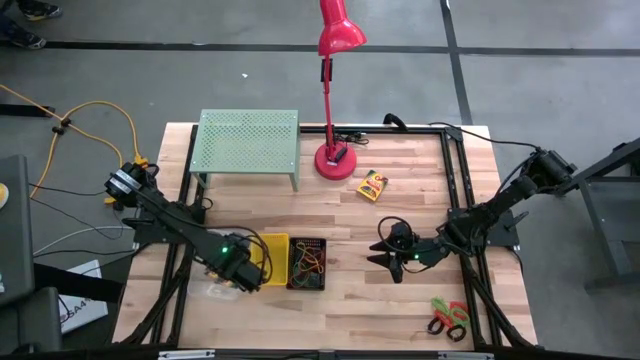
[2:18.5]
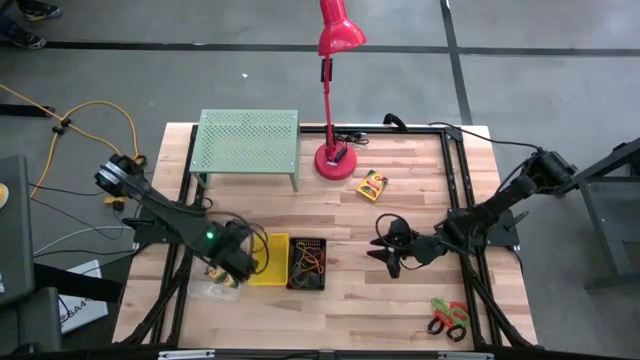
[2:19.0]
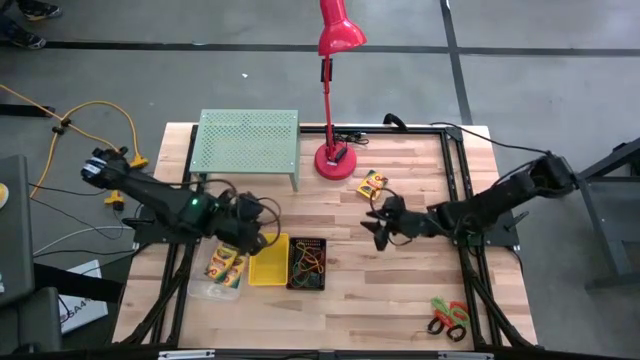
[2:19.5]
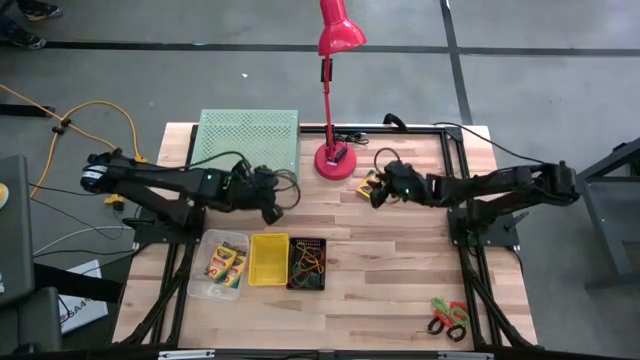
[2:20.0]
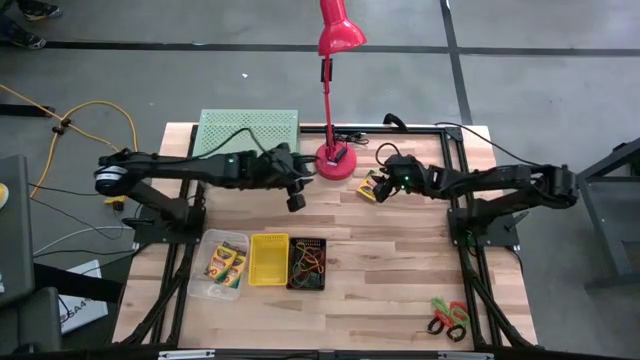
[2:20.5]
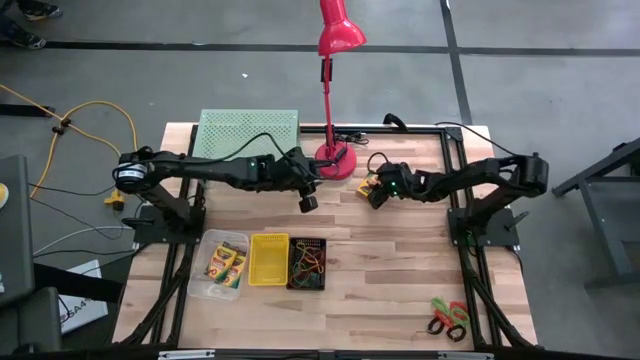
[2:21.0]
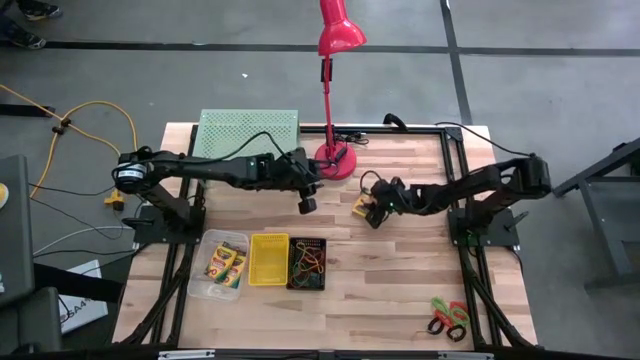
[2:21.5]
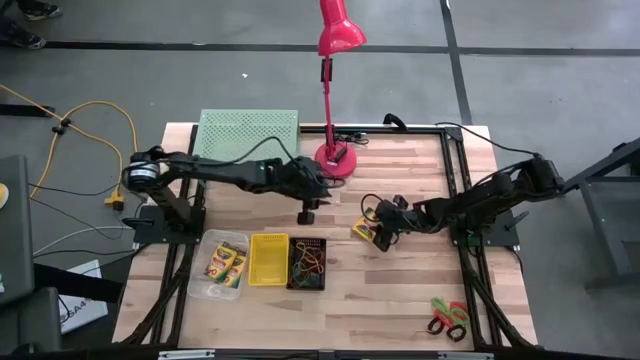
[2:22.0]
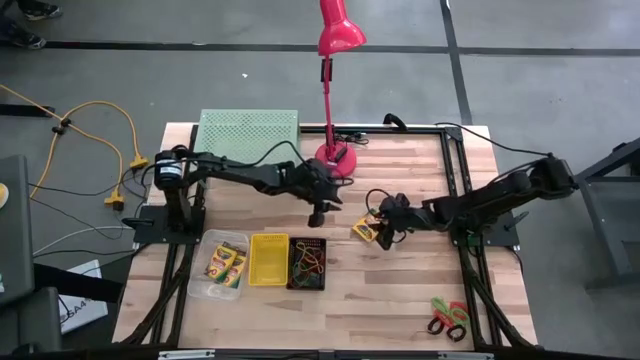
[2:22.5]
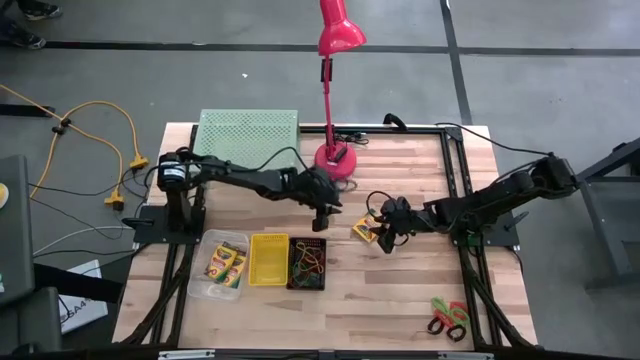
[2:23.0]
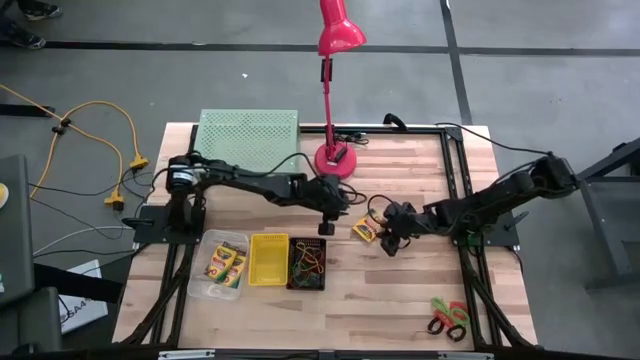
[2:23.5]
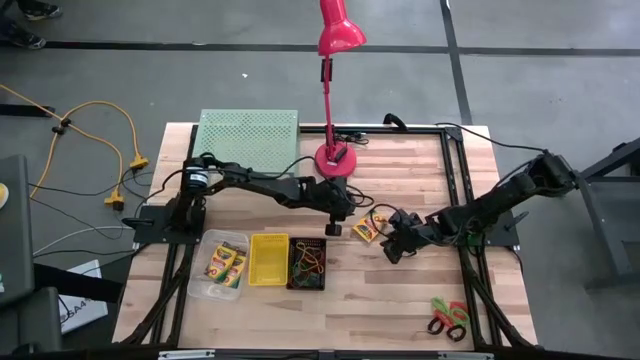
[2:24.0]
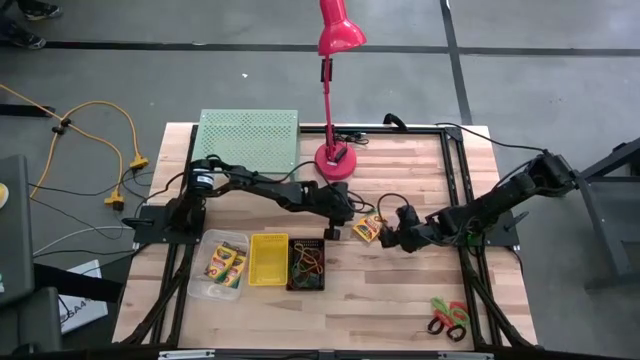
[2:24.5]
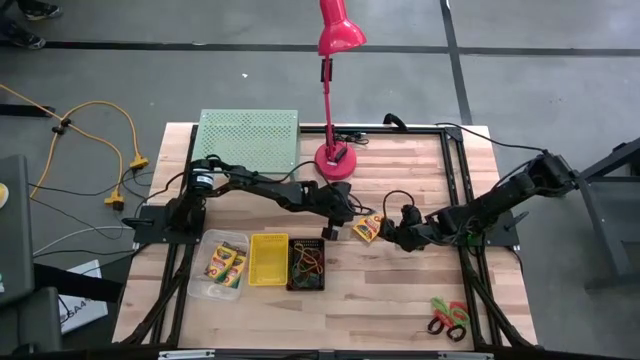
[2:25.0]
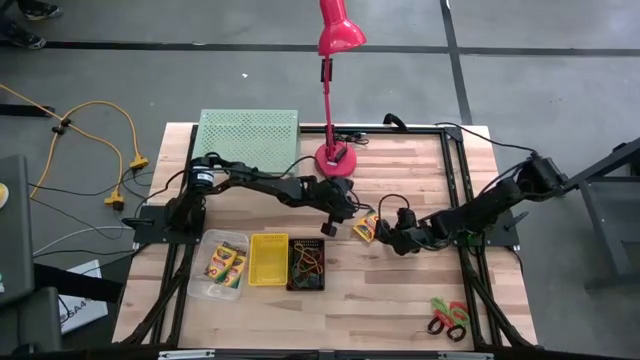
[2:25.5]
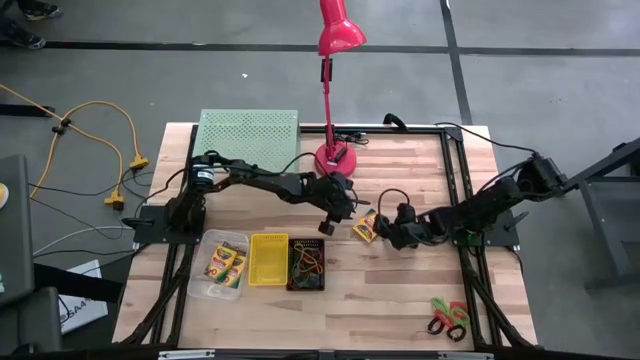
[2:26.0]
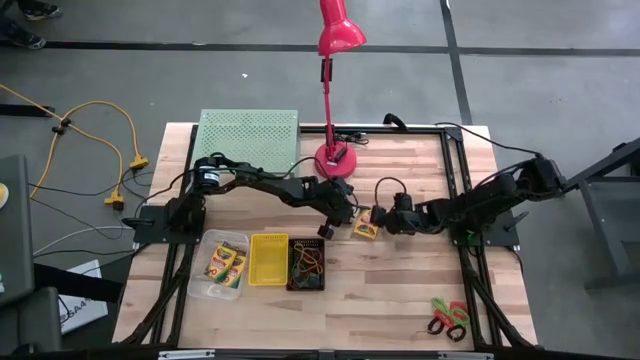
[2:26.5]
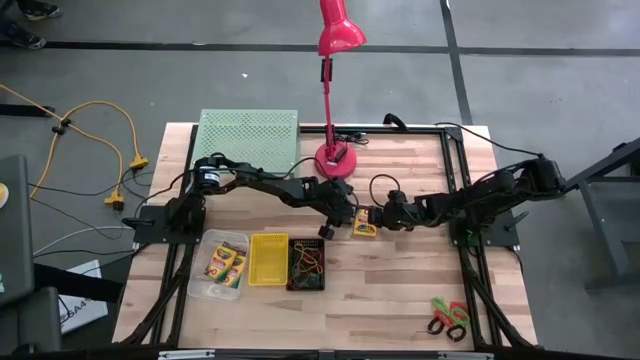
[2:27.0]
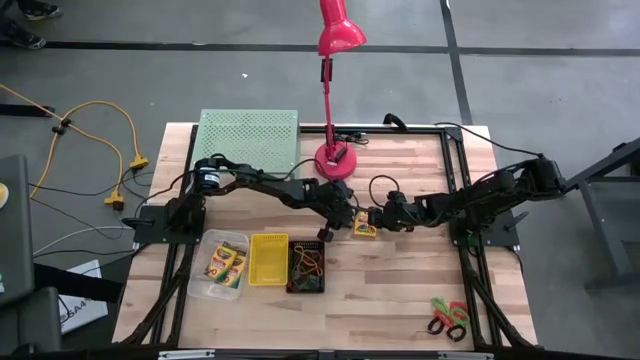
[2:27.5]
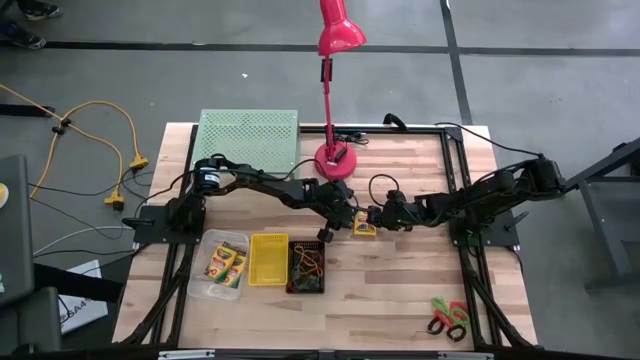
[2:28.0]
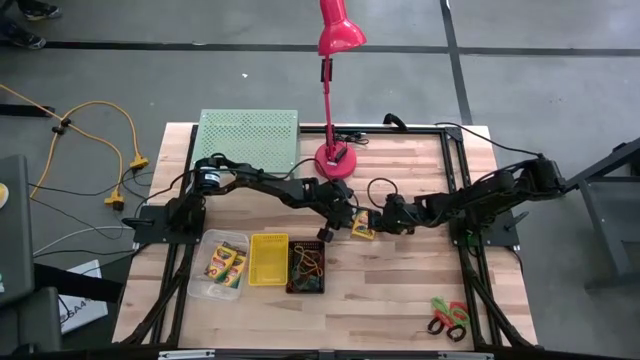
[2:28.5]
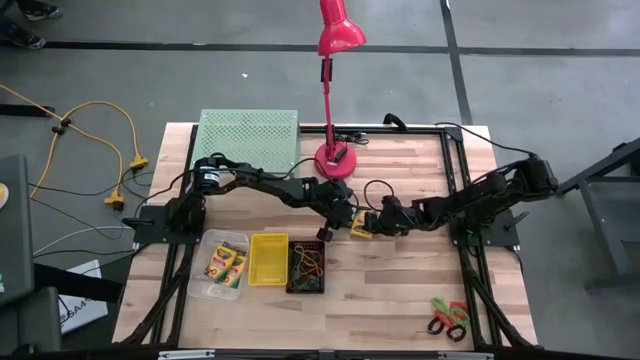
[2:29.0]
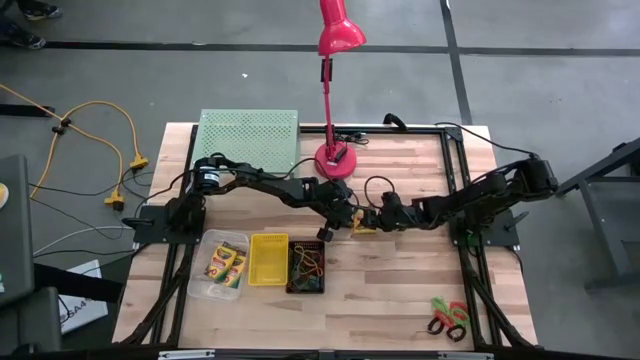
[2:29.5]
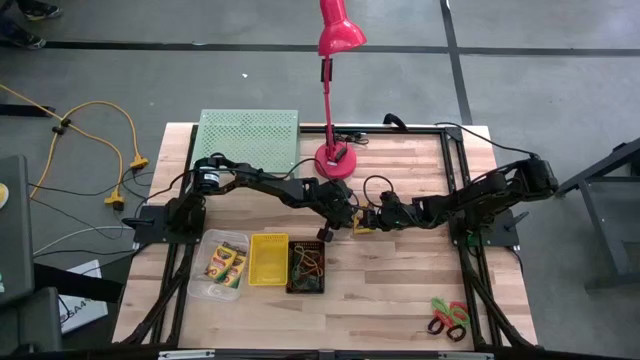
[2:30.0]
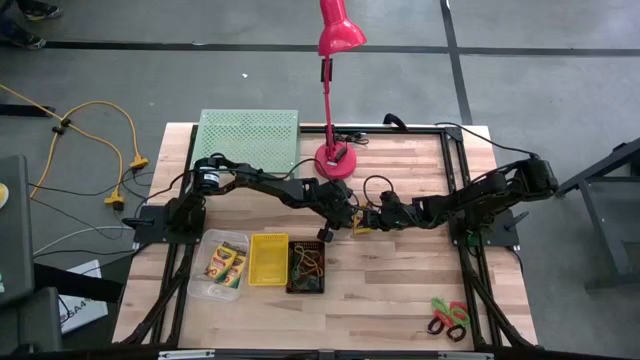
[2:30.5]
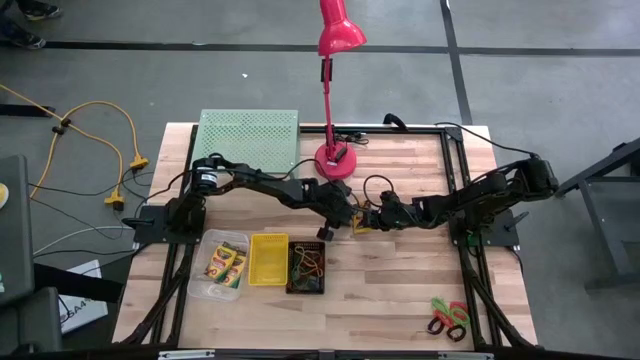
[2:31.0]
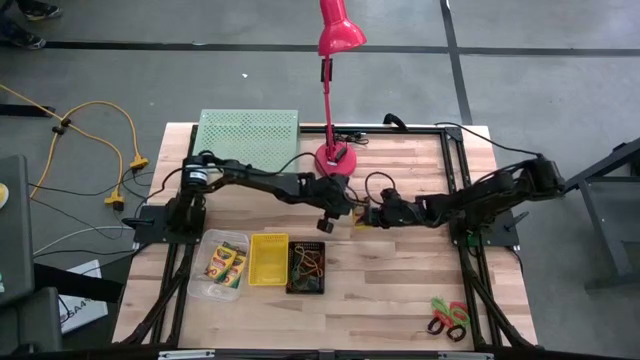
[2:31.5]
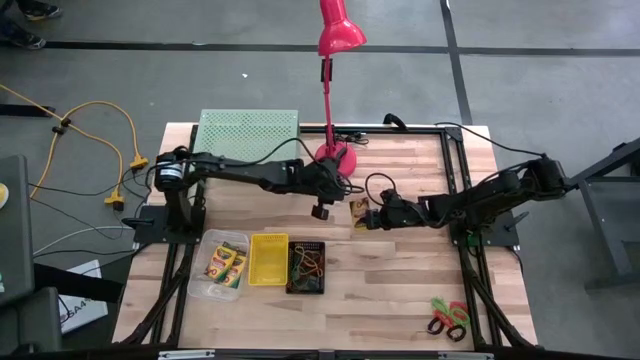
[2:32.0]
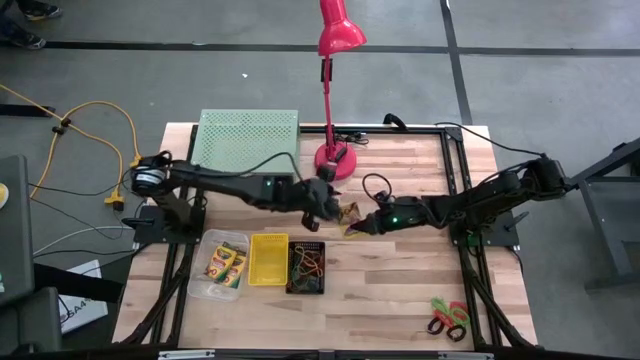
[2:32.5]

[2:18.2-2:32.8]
Task: Pick & Place Office Desk Supplies
Put the crayon box into the transparent box

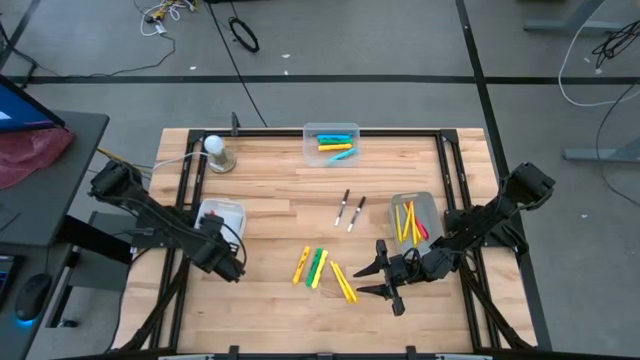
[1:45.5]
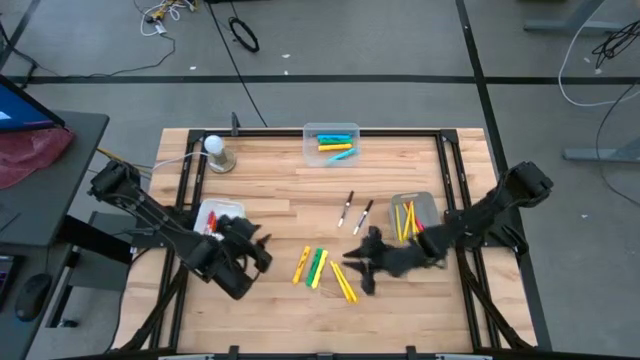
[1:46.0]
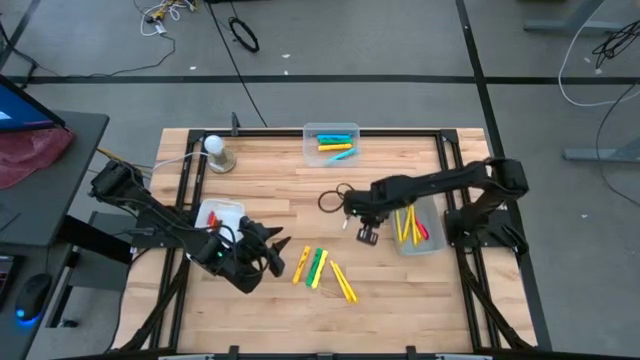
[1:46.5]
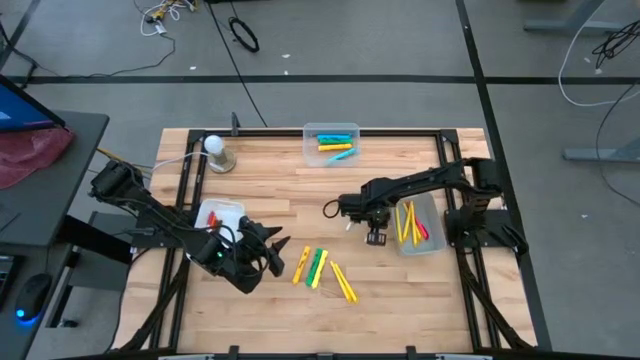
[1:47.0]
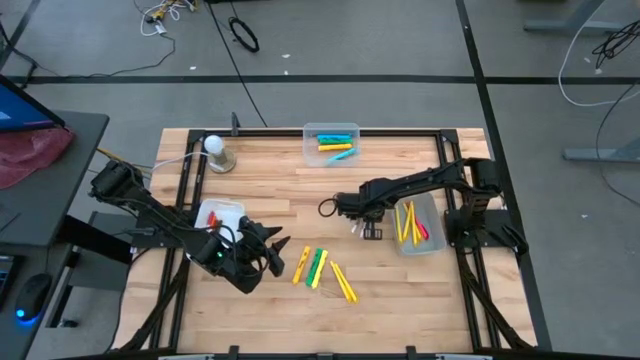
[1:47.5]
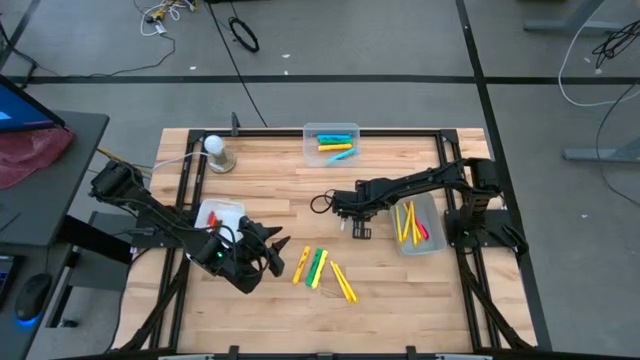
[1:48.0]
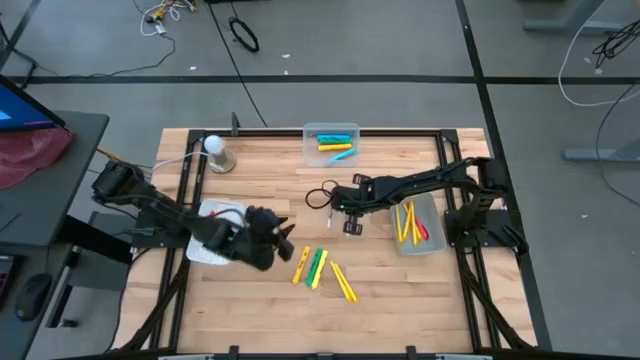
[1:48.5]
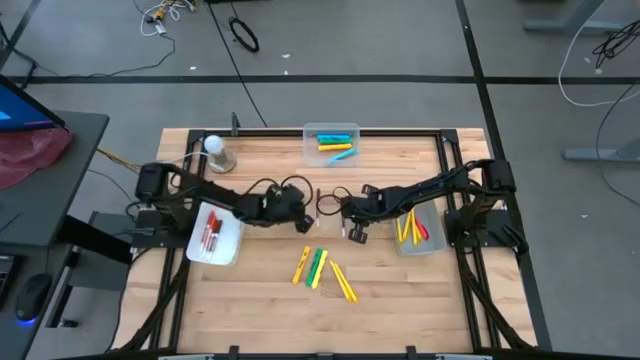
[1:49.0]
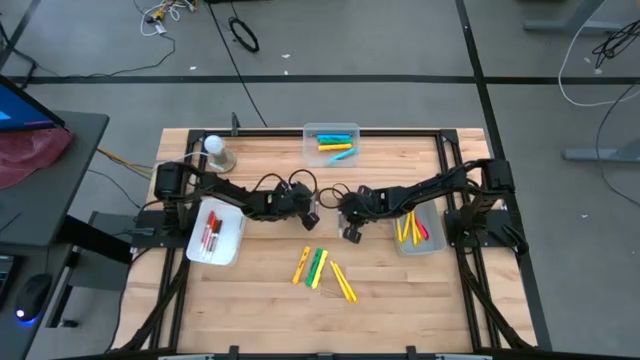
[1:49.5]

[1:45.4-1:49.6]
Task: Pick & Place Markers
Adjust the marker pens on the table

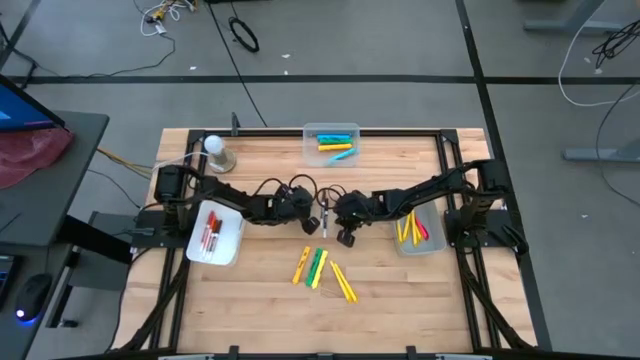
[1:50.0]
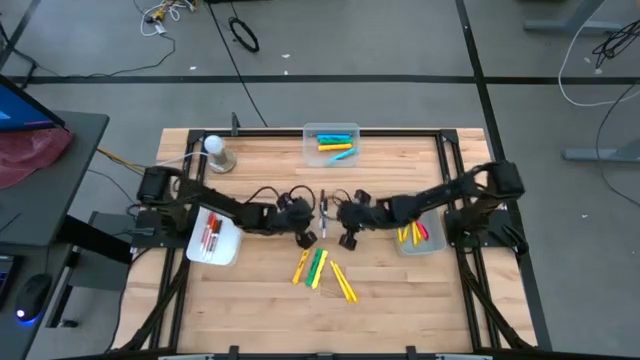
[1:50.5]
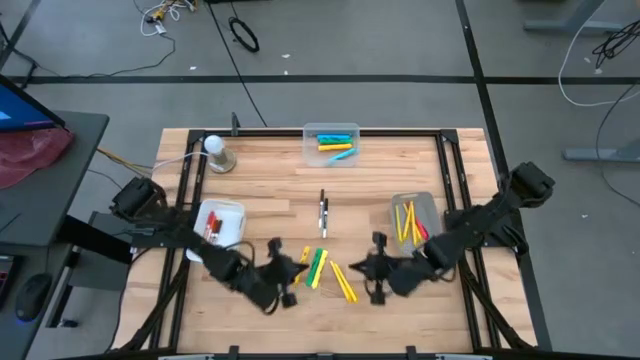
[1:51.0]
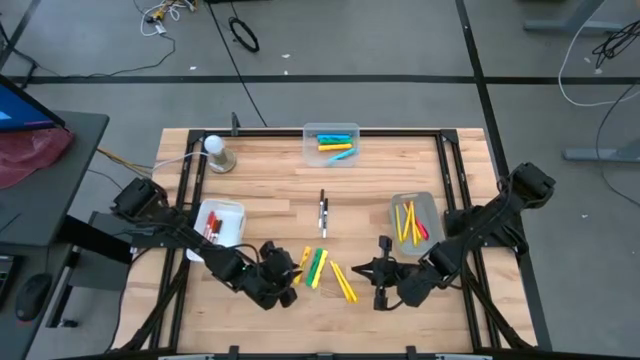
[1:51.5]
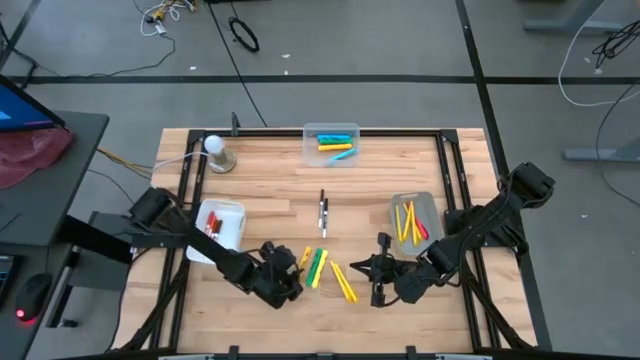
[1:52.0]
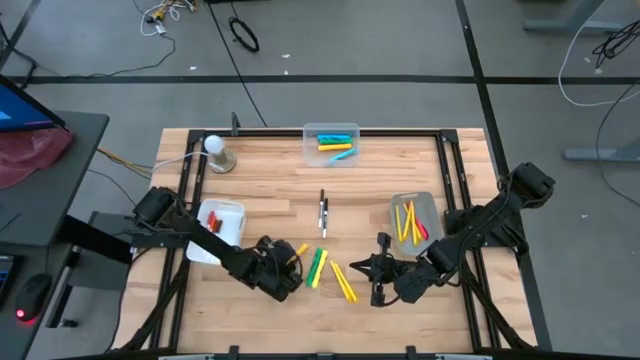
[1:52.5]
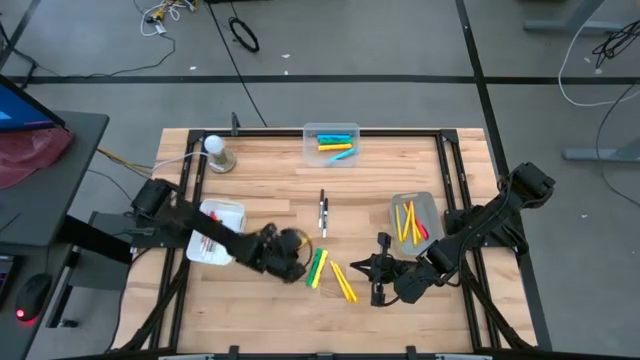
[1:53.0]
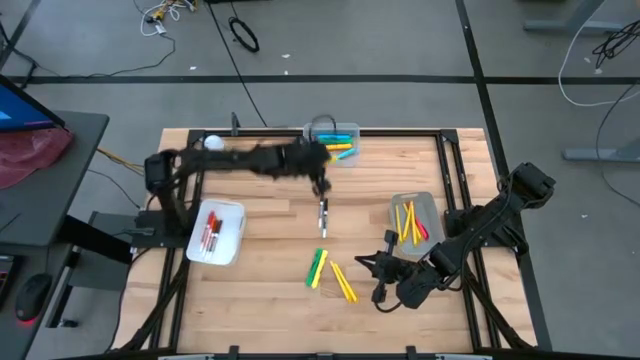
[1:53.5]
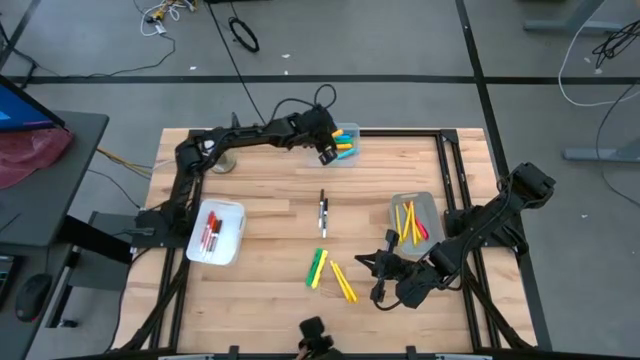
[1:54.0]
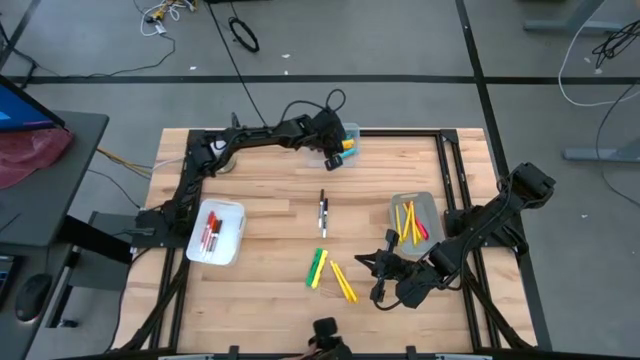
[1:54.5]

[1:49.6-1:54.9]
Put the yellow highlighter pen into the transparent bin
